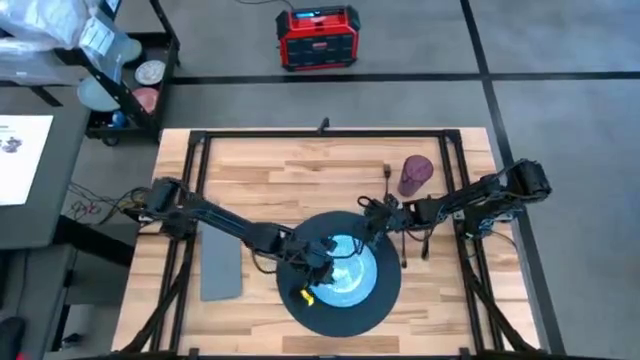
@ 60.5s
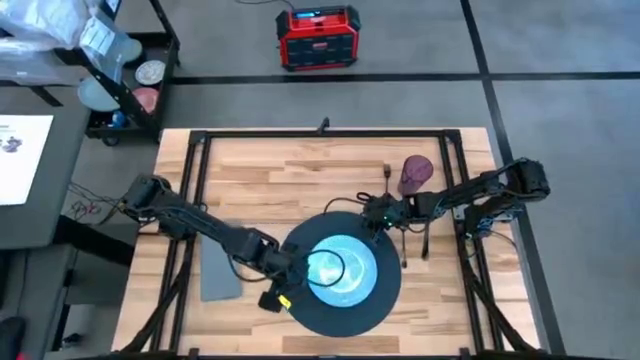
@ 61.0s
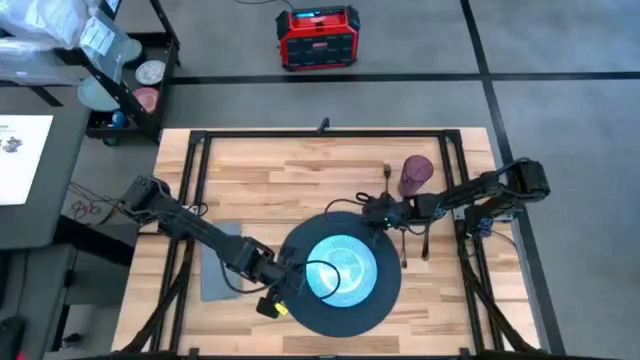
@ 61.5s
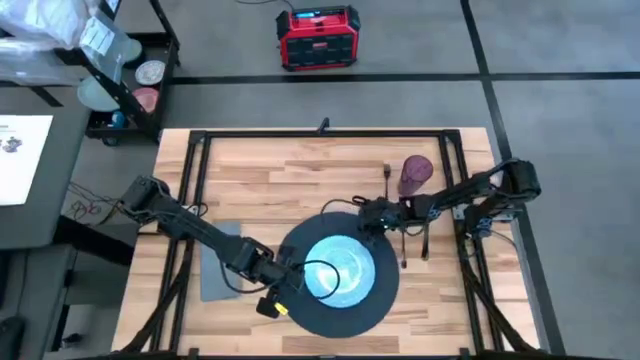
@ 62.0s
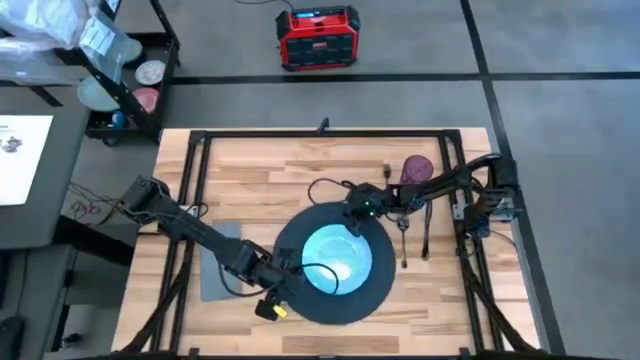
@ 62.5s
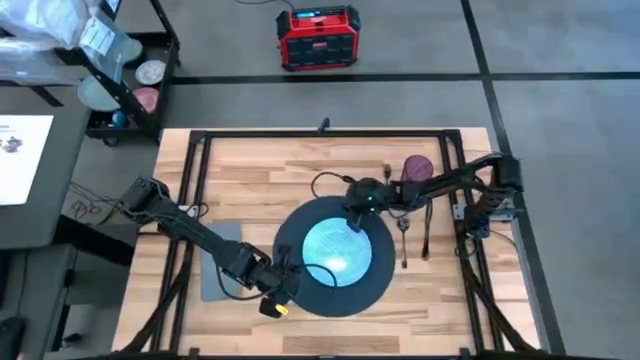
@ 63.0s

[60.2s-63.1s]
Task: Set table place
Adjust the black tablemat

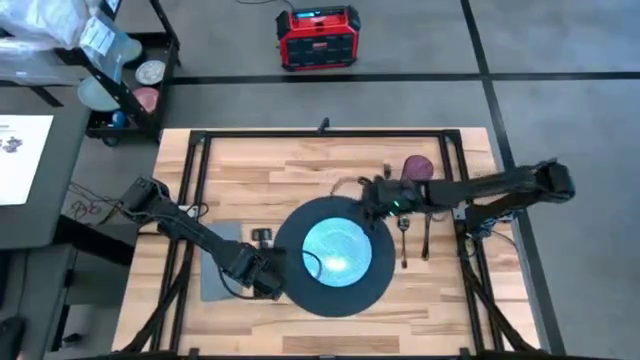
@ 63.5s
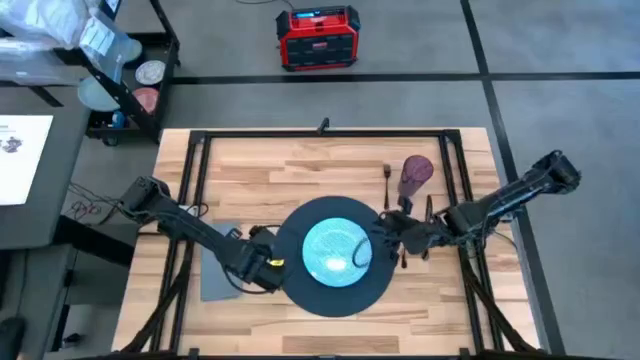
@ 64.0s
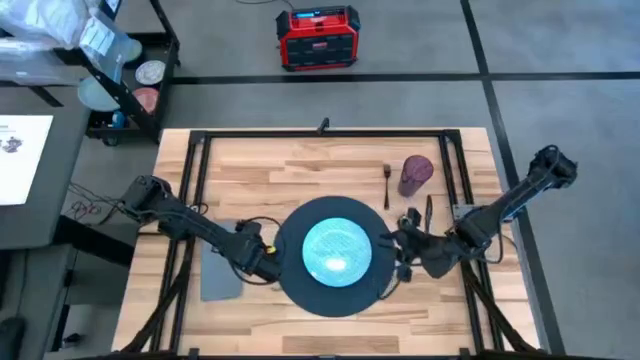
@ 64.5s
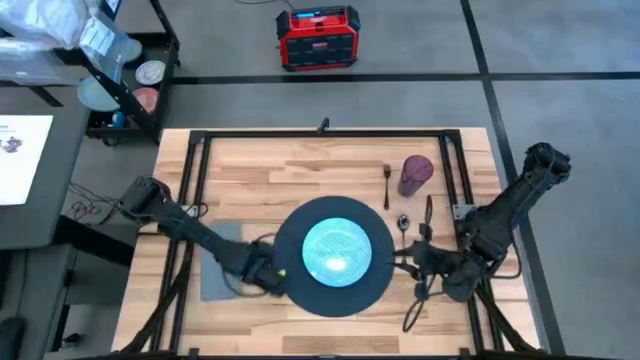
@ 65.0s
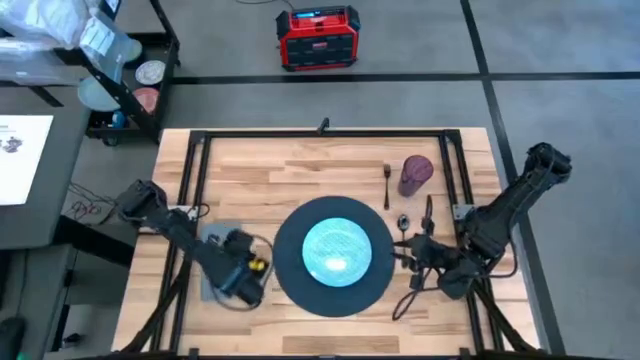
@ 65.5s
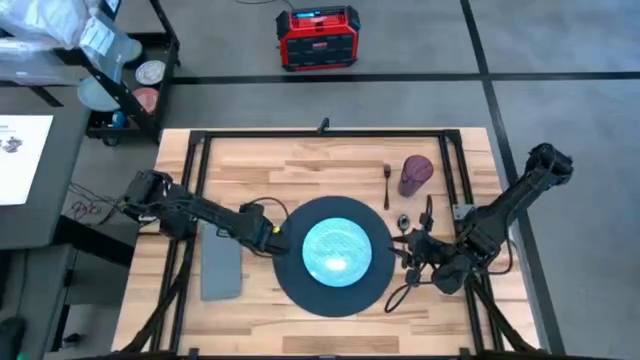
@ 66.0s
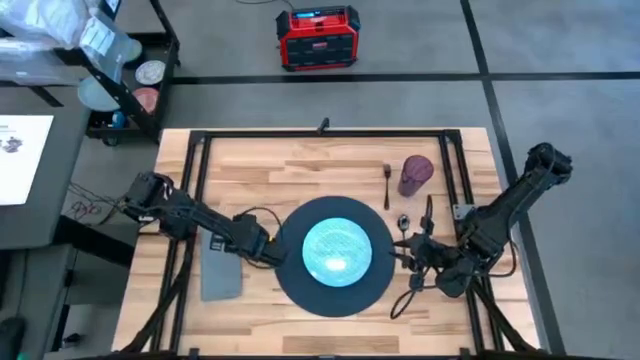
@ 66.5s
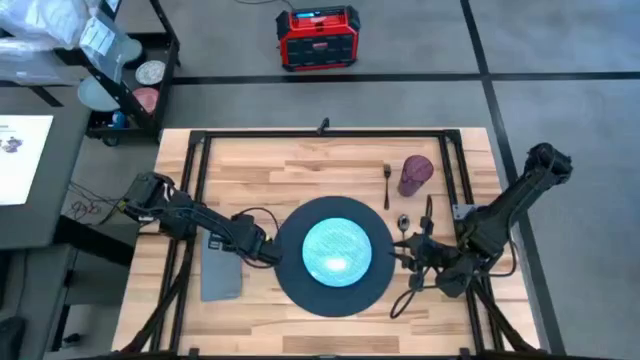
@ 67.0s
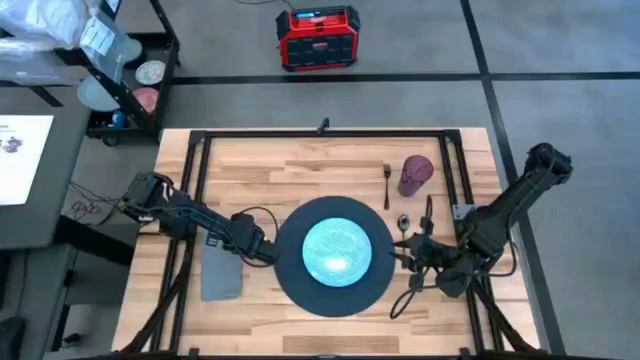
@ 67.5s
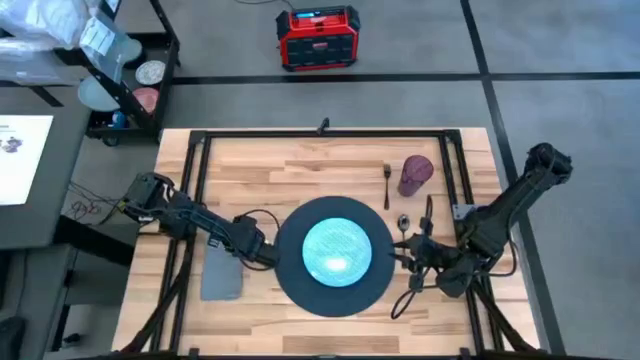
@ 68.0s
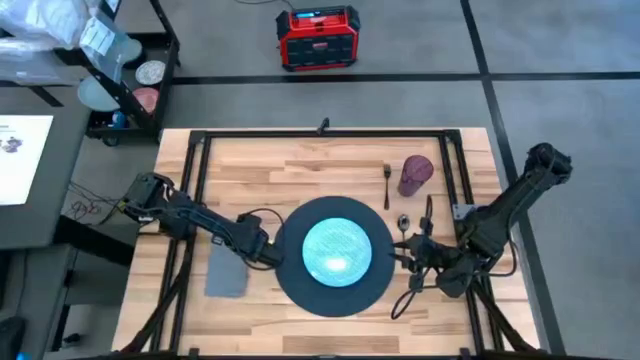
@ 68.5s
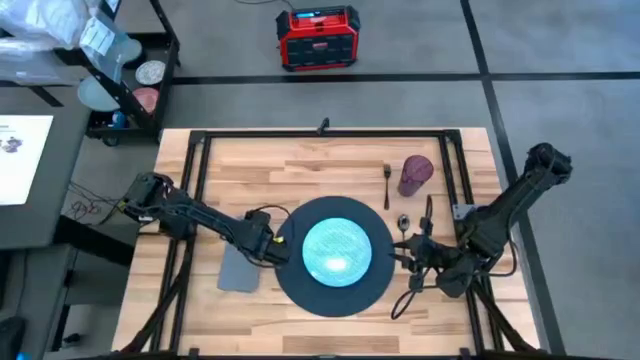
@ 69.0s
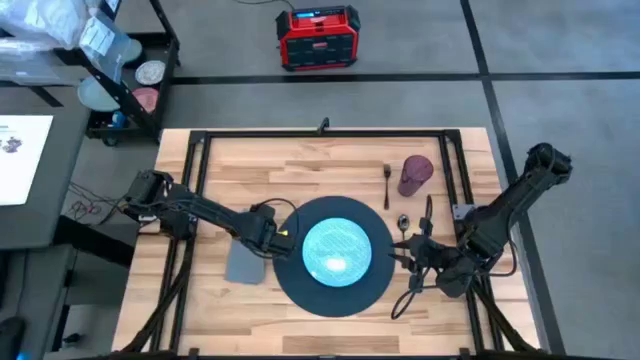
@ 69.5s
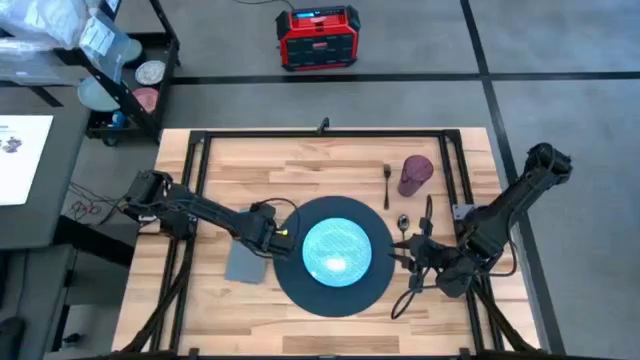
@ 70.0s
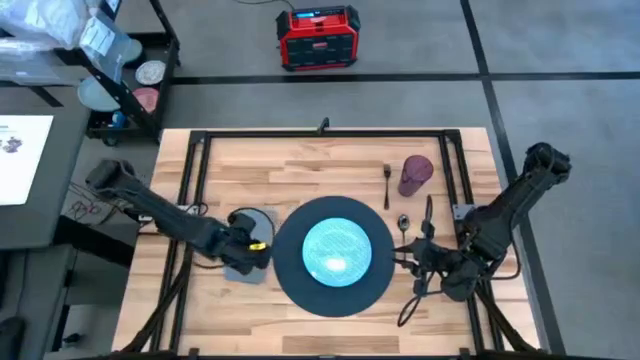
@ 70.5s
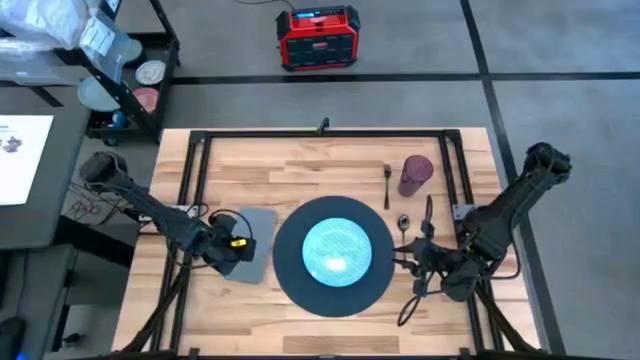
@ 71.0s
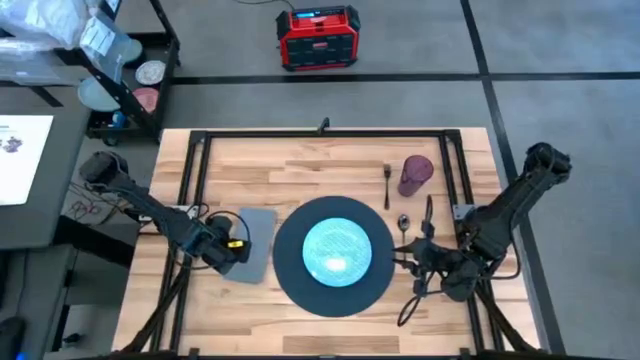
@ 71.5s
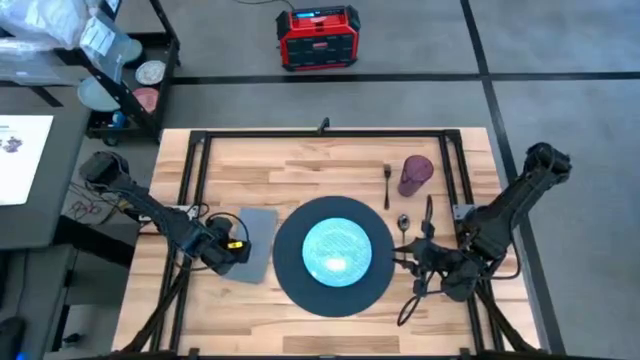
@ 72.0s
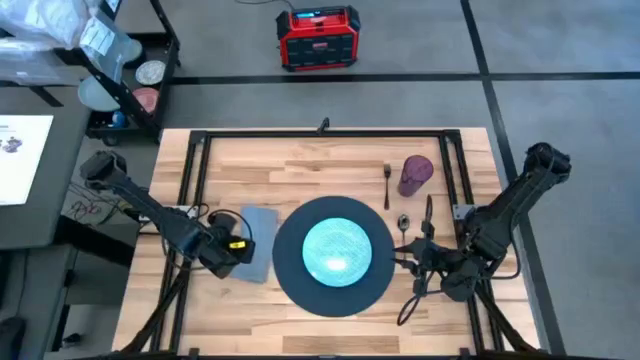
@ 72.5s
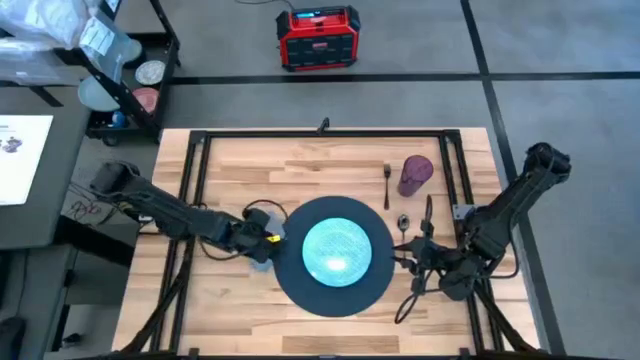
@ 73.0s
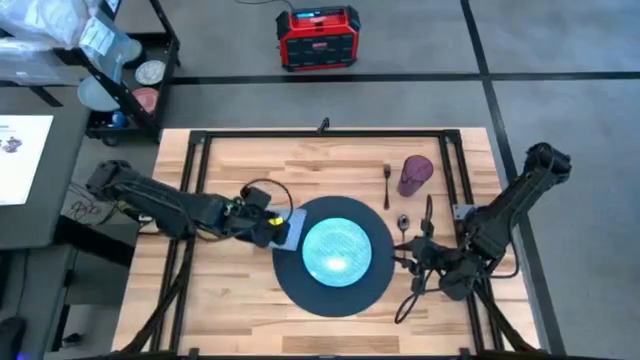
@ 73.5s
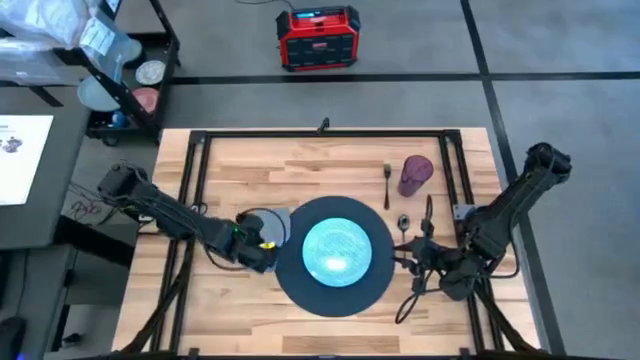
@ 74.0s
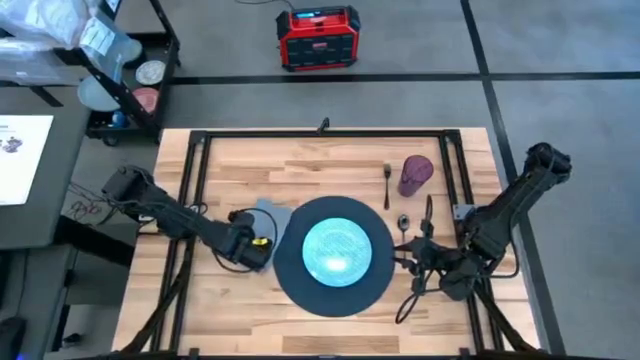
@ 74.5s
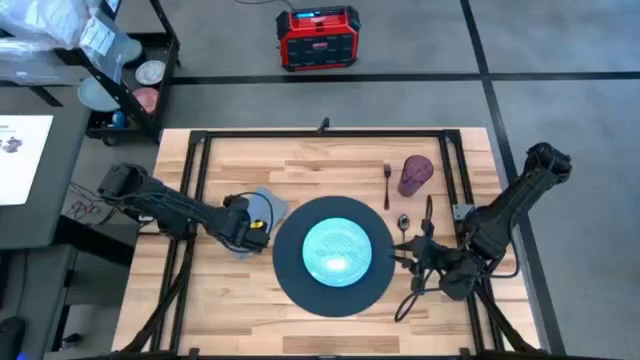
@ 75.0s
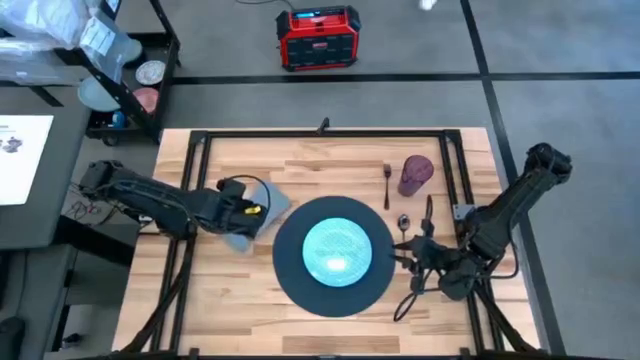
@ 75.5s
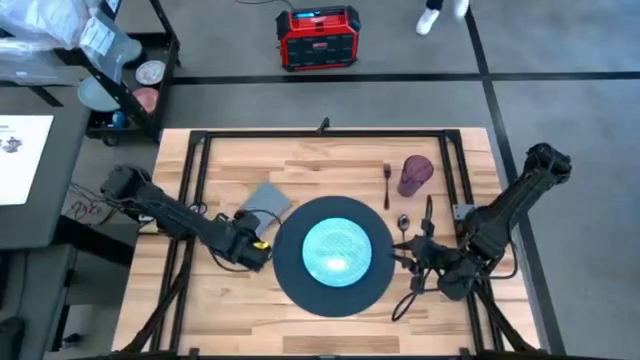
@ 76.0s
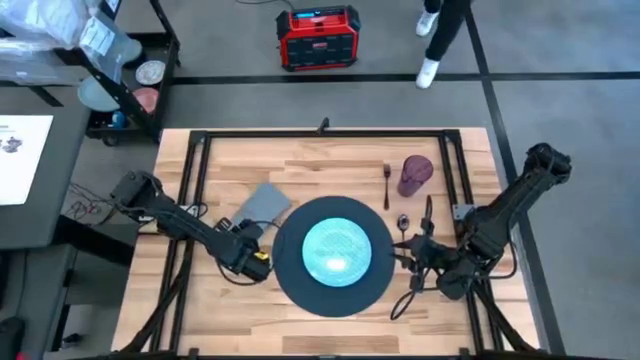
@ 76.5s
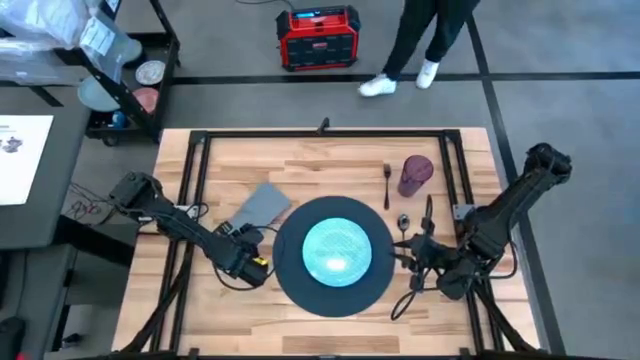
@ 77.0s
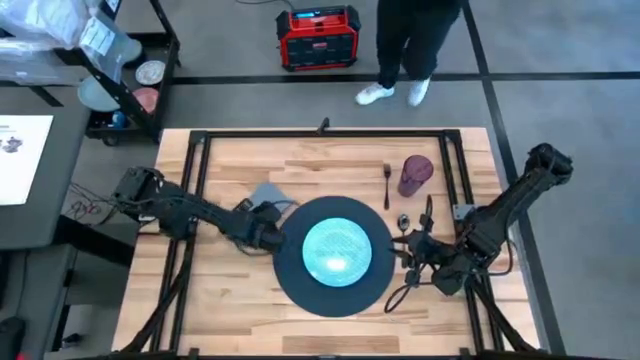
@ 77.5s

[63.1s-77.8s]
Move the gray table napkin on the left side of the blue plate

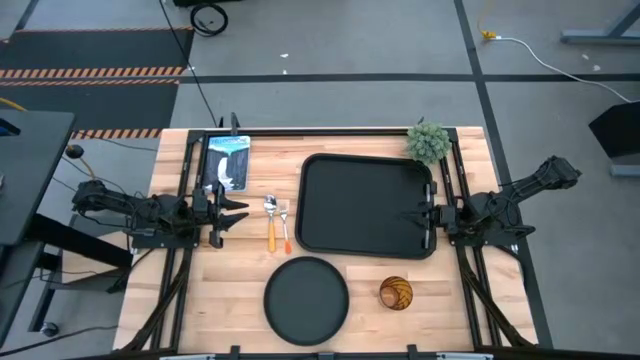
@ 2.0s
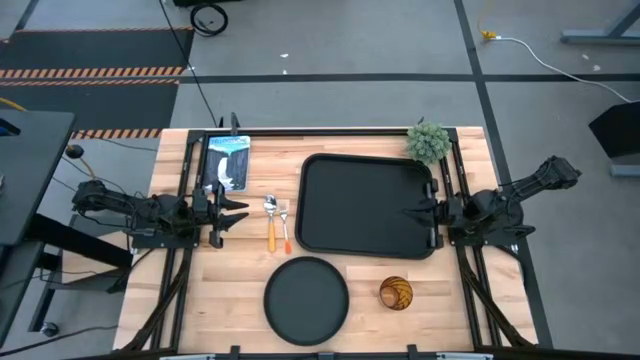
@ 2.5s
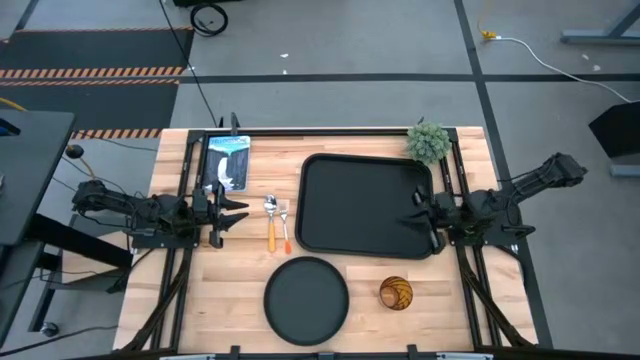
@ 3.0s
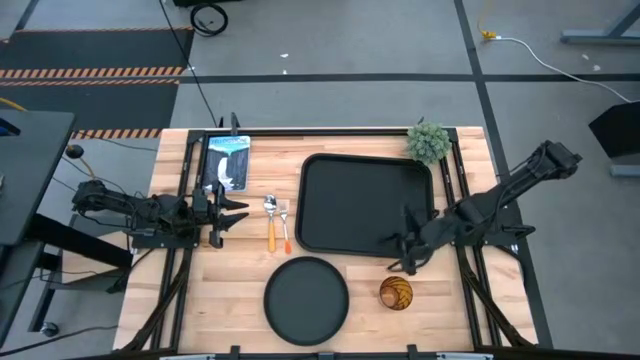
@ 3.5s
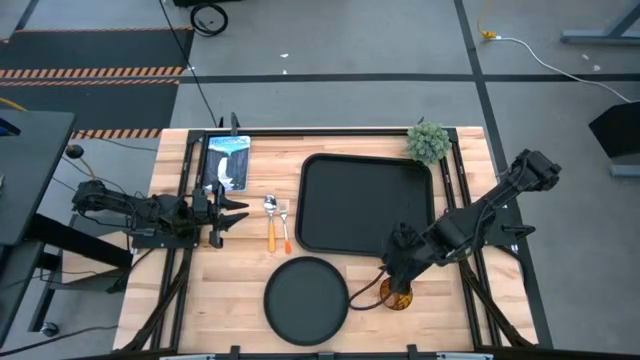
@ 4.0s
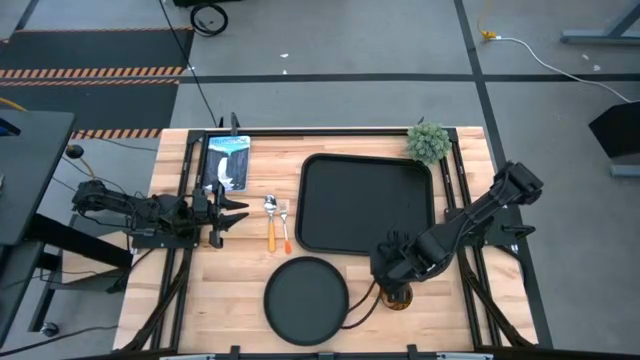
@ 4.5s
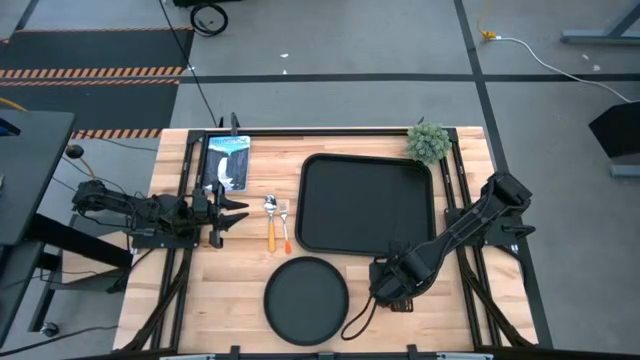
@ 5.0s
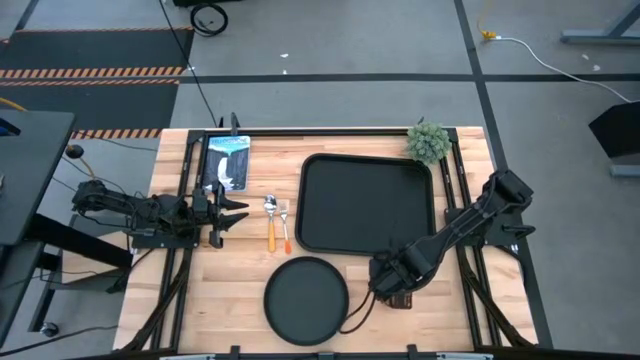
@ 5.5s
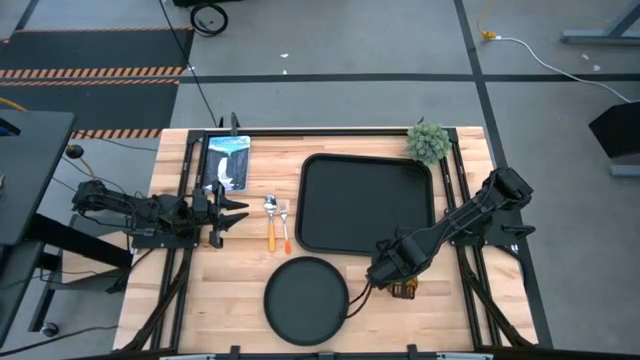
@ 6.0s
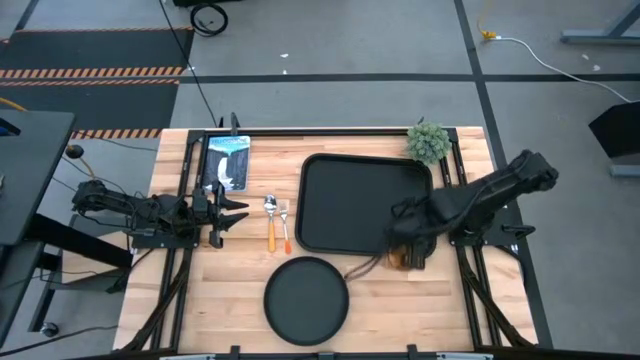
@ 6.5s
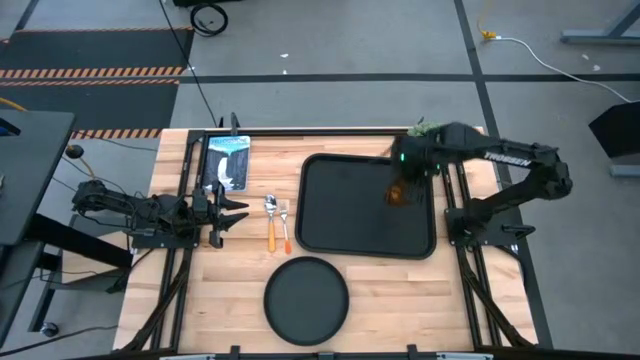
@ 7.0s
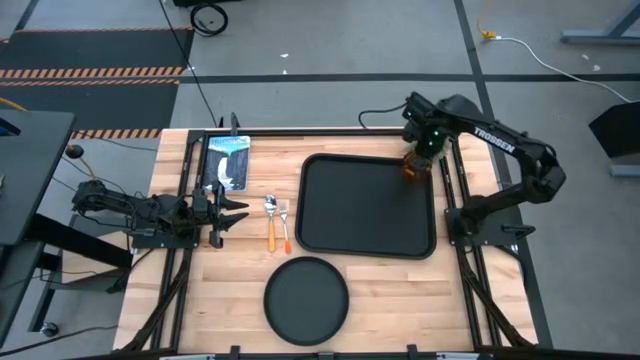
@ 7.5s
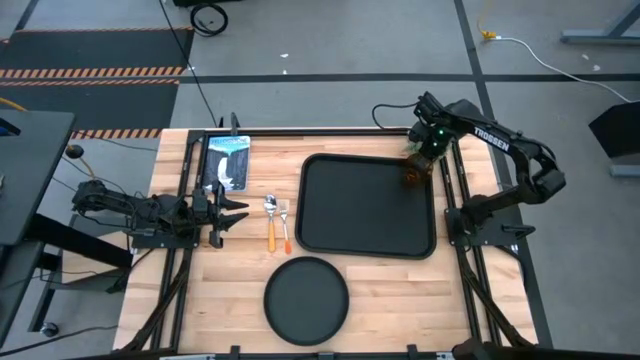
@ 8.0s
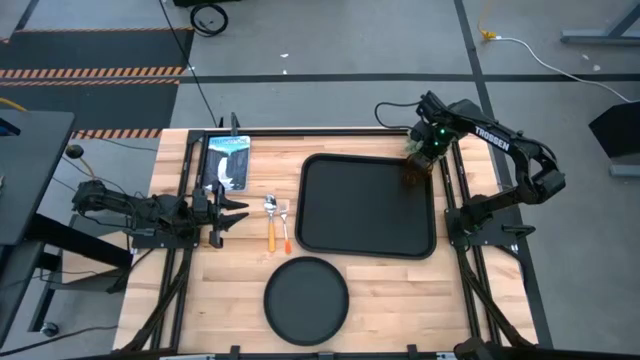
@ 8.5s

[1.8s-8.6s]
Task: Pick and place plate/cup/fork/spoon on tray
Put the yellow cup on the black tray
